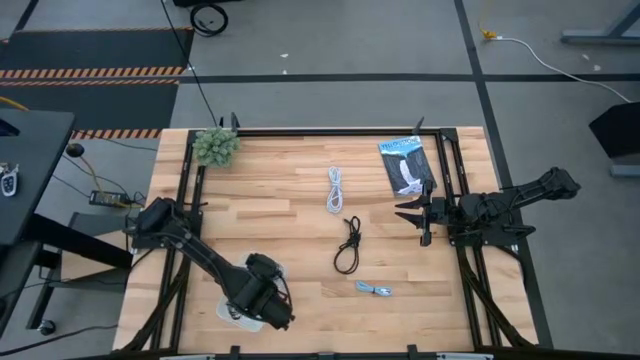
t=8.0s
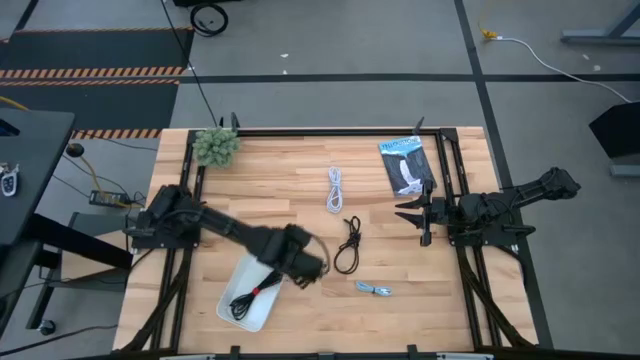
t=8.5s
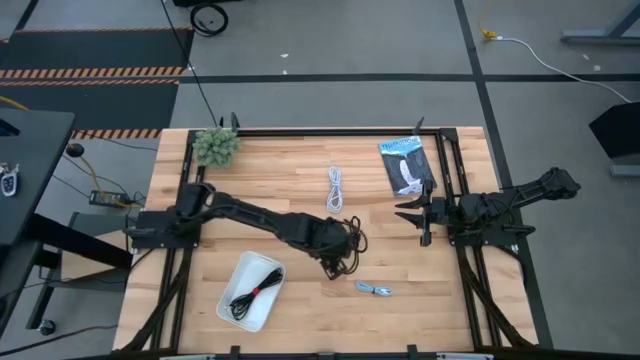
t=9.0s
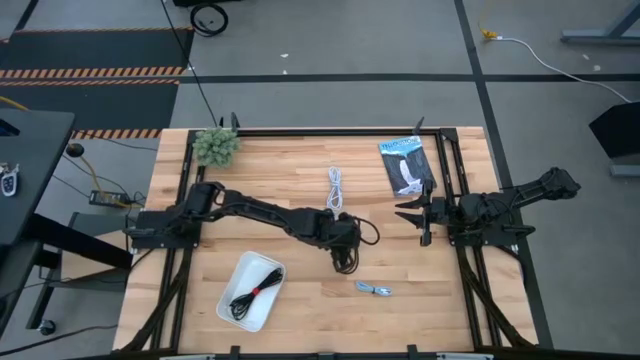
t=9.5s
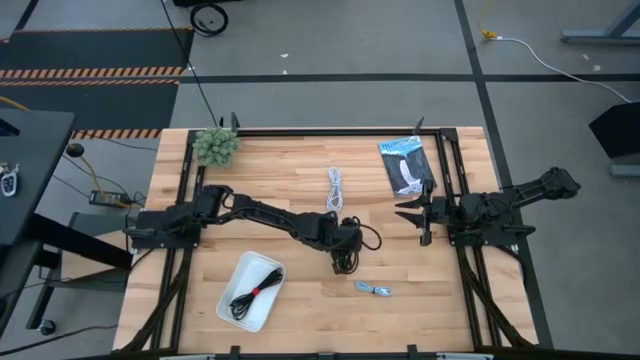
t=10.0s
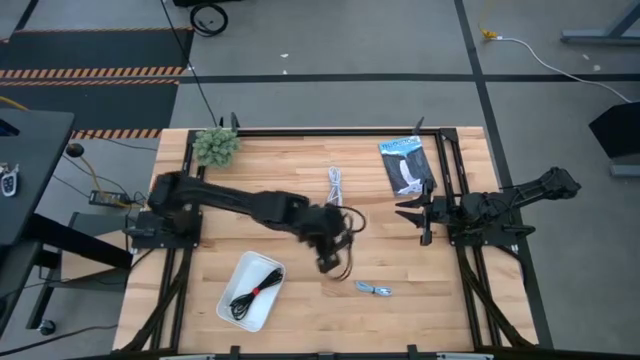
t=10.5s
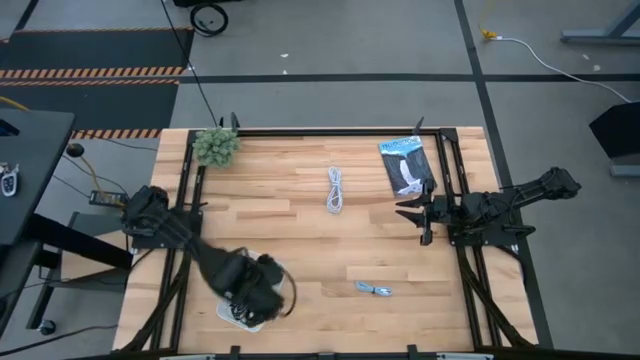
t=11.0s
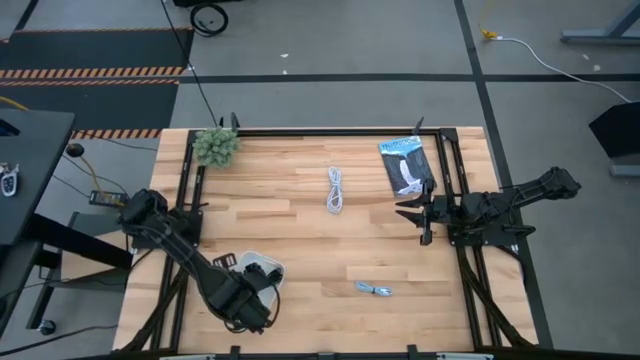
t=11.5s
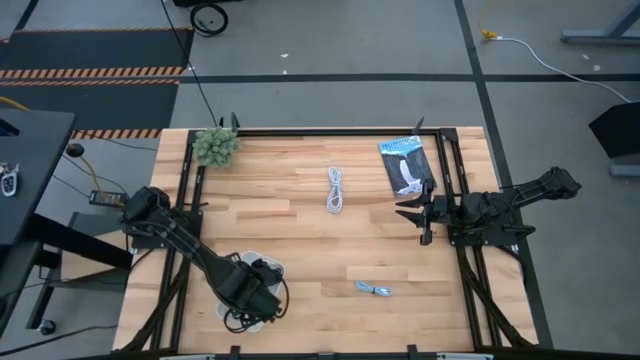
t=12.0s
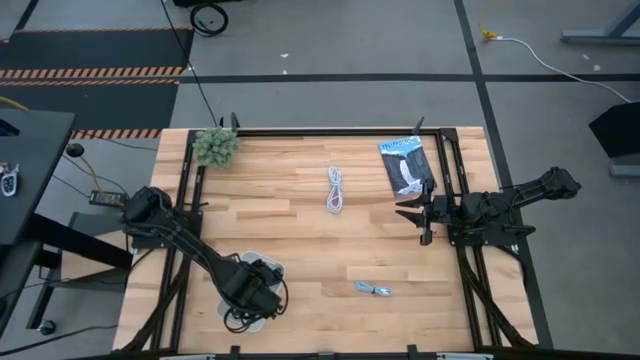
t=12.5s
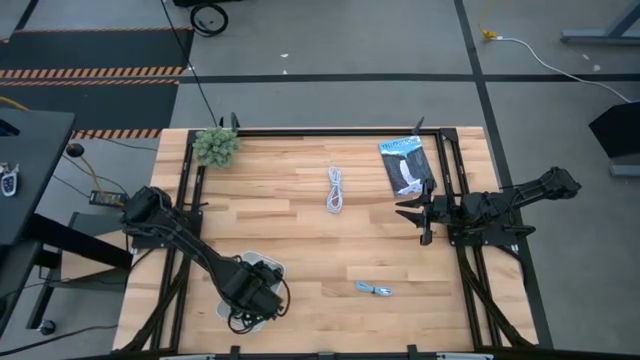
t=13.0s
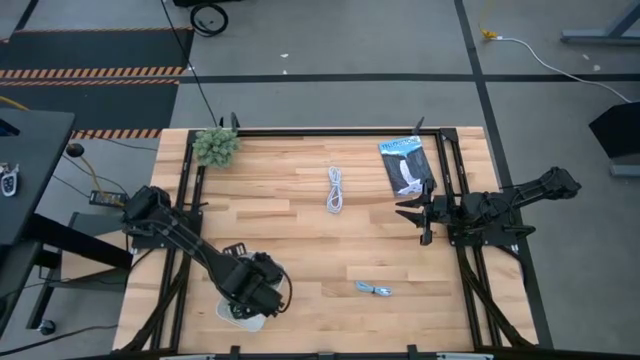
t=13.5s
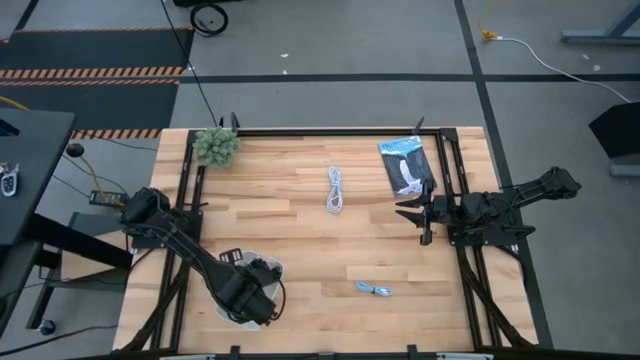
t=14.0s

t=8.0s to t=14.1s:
Task: Pick and place USB-C Cables
Put the black charger cable into the white bin

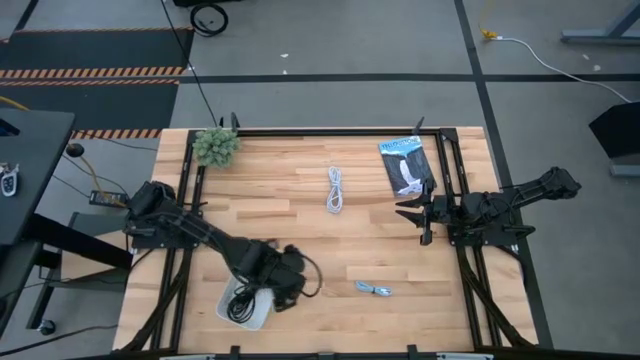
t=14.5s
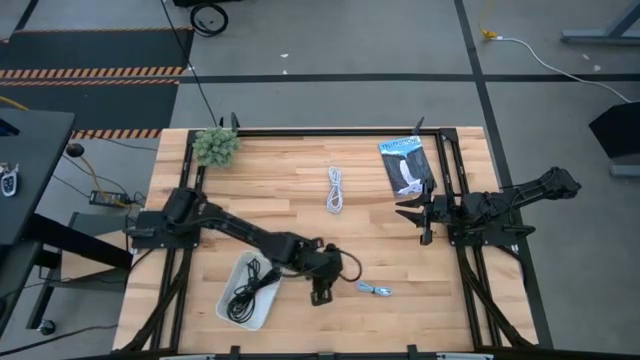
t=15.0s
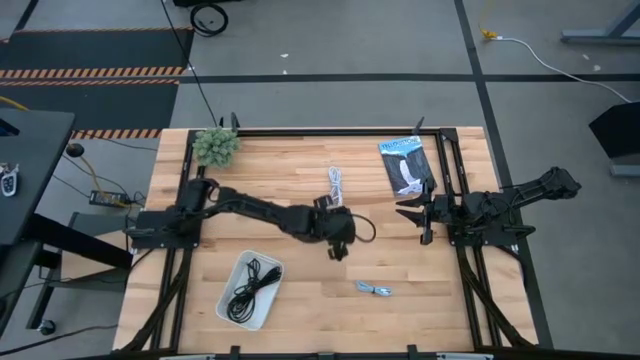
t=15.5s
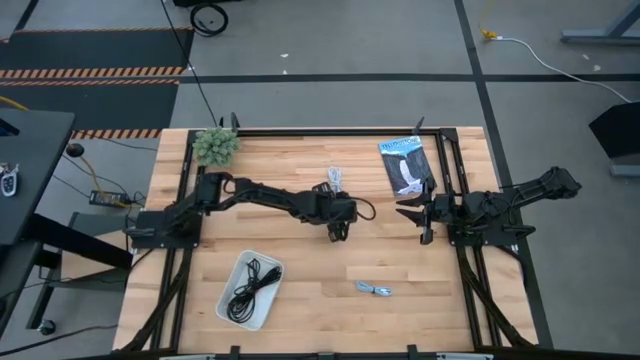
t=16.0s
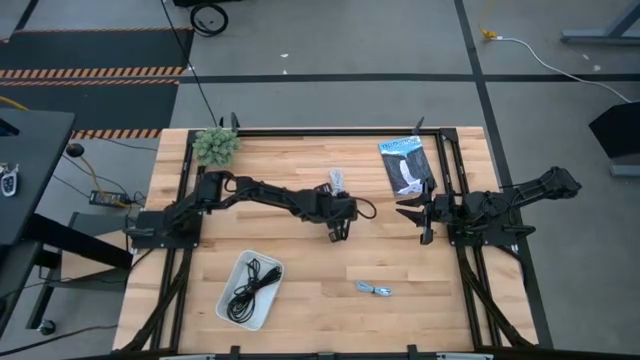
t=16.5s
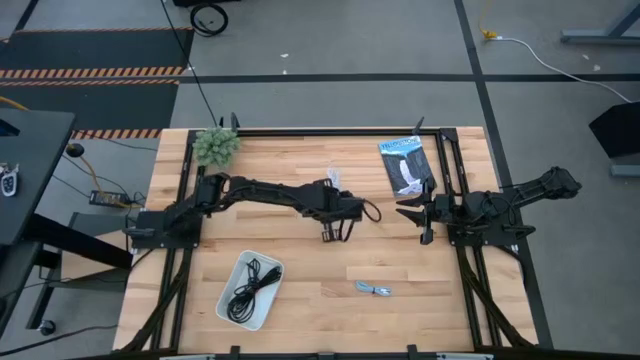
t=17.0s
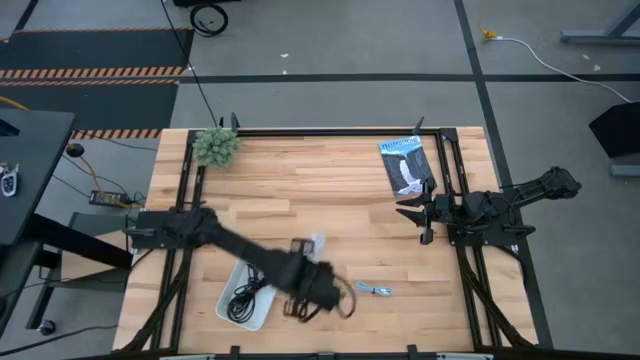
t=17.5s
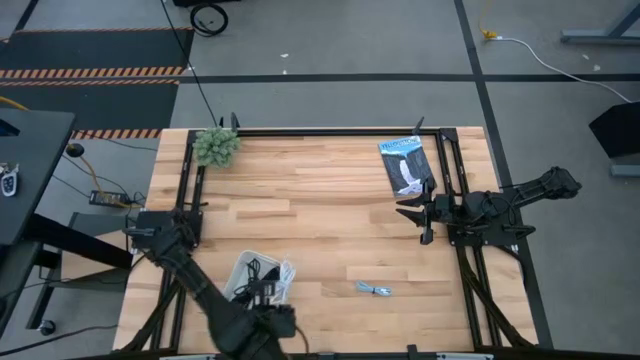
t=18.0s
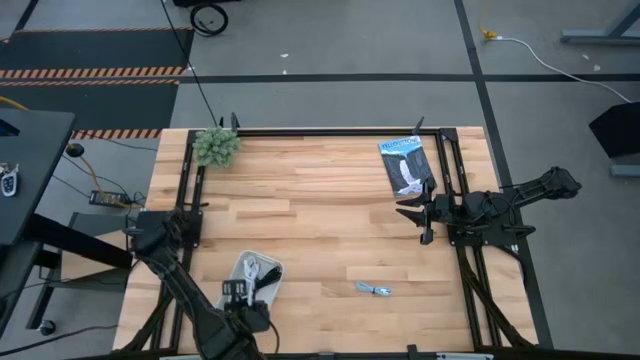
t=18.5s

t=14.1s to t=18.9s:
Put the white charger cable into the white bin

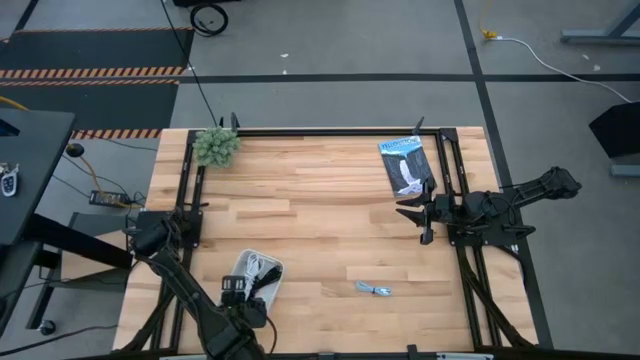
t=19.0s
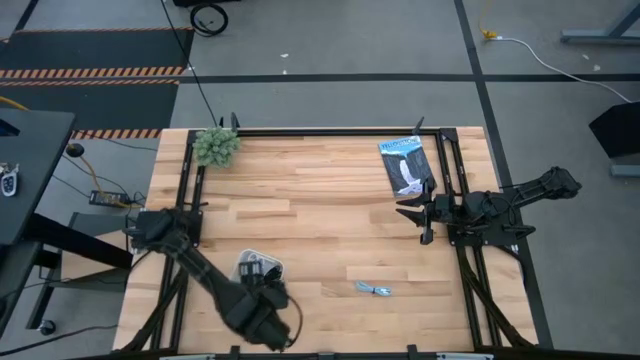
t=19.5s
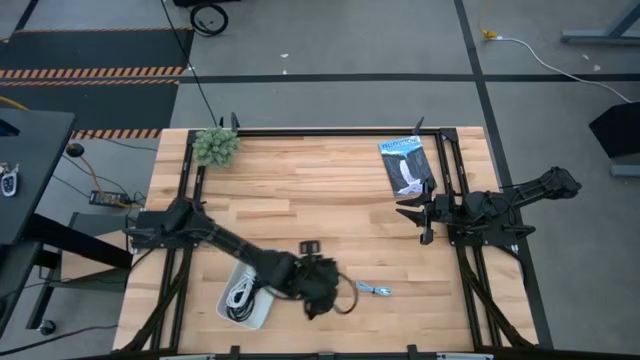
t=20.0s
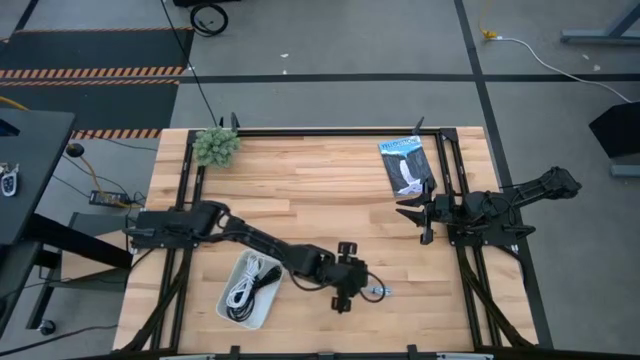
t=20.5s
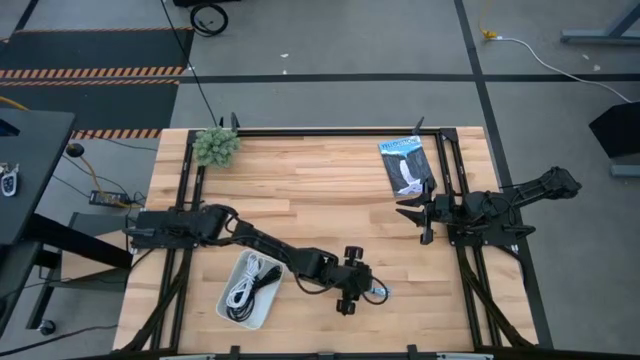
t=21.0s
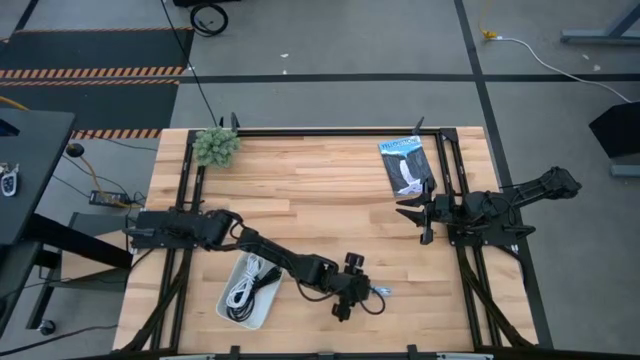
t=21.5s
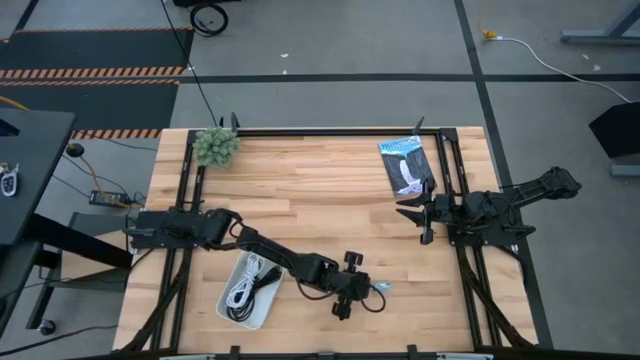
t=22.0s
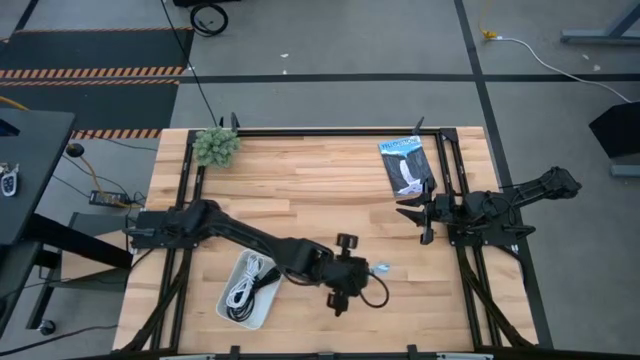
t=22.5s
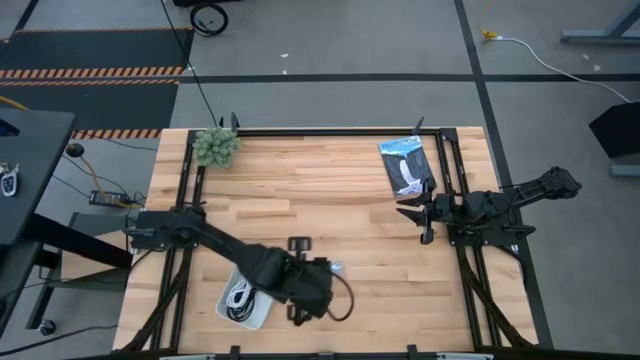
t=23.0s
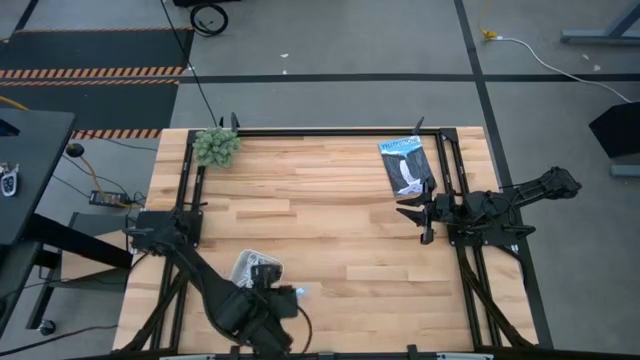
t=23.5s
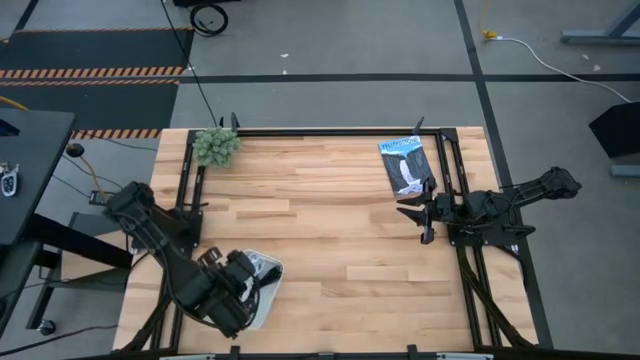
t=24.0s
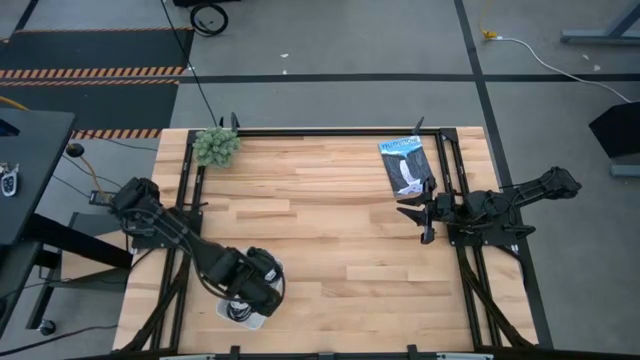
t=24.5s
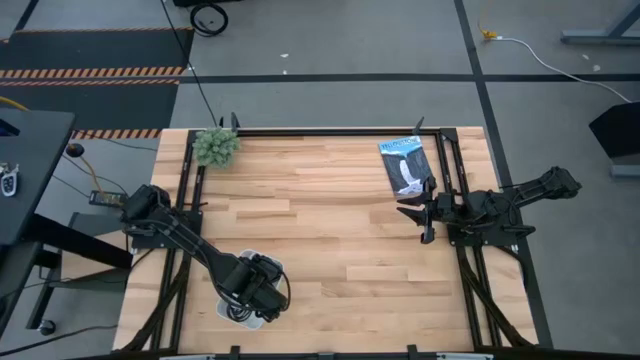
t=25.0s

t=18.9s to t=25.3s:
Put the light blue charger cable into the white bin

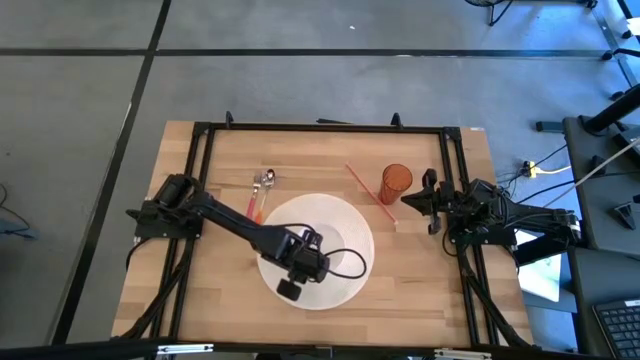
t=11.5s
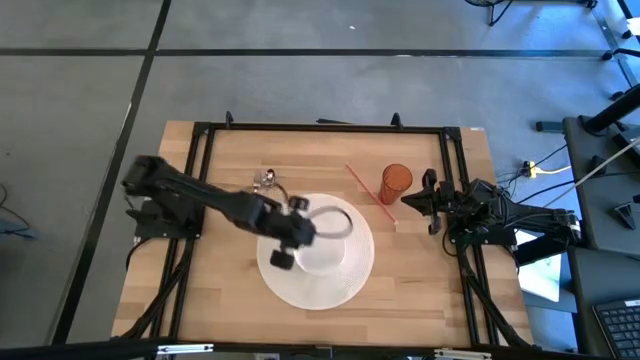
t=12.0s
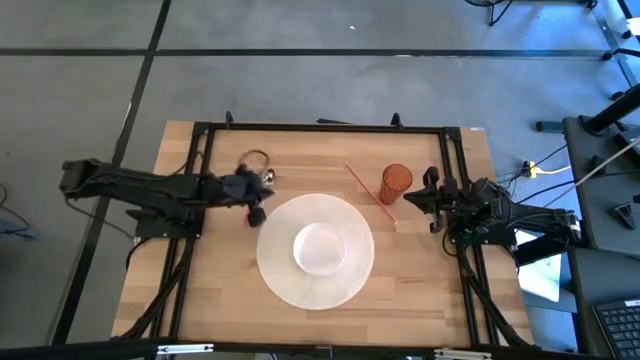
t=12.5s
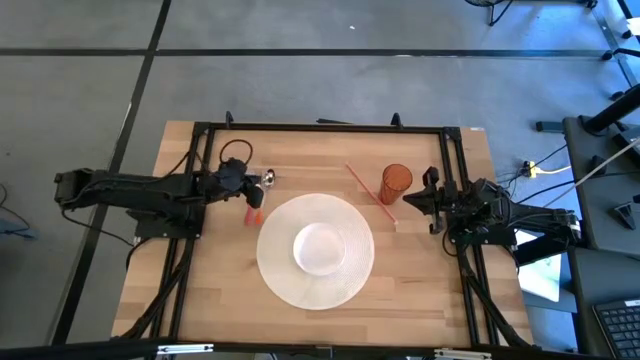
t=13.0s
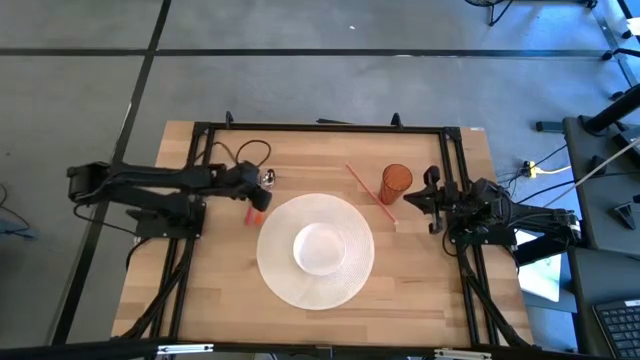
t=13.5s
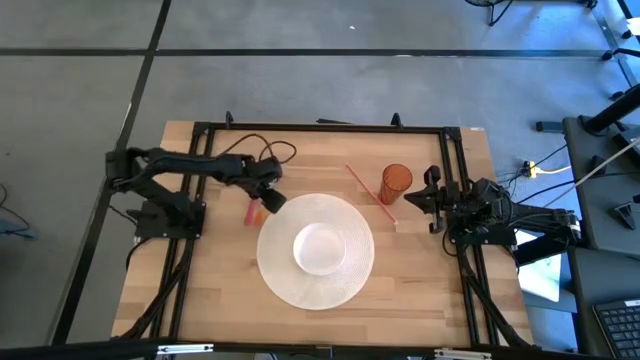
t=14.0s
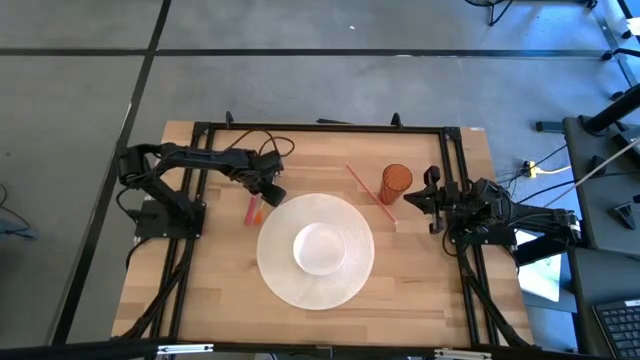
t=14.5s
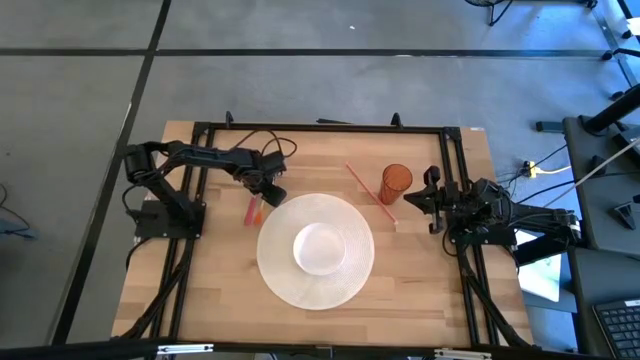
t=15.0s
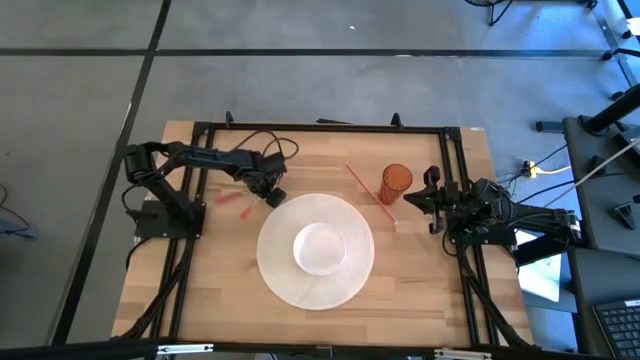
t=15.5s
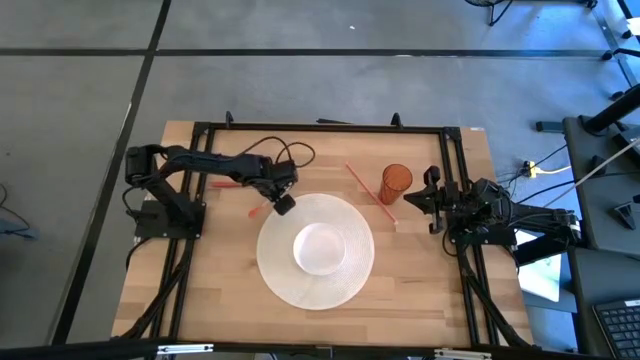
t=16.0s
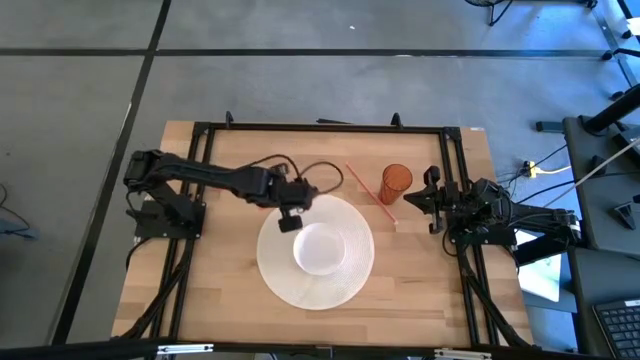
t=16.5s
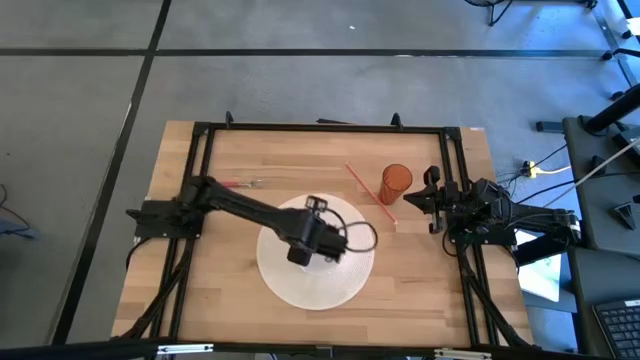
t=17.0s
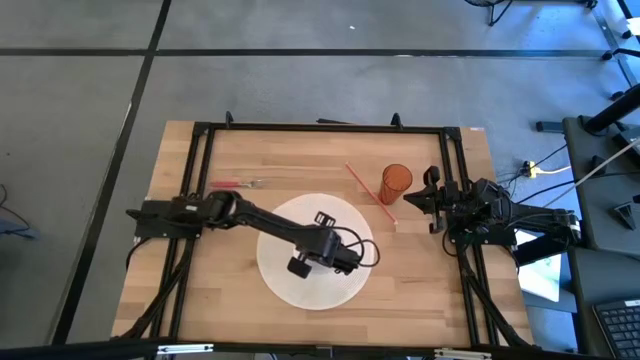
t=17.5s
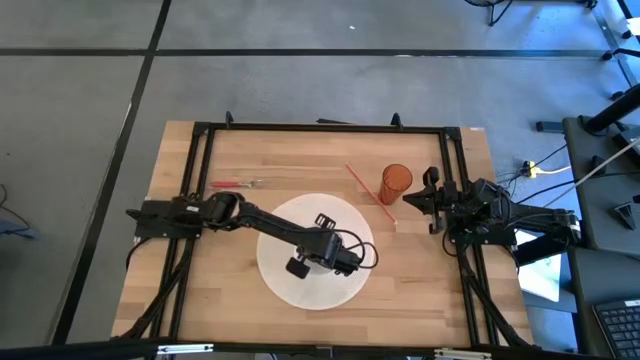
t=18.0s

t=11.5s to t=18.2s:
Task: Pick & Place Utensil
Put the orange spoon into the white bowl
